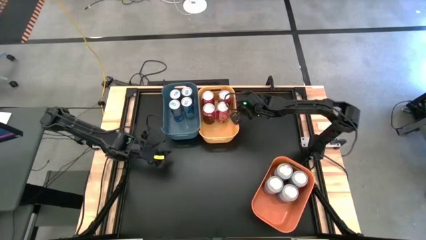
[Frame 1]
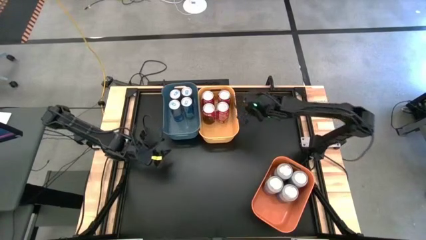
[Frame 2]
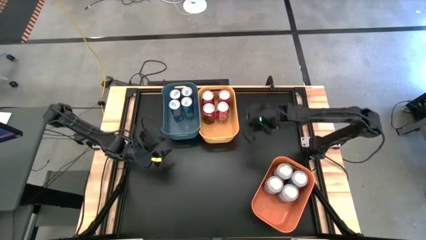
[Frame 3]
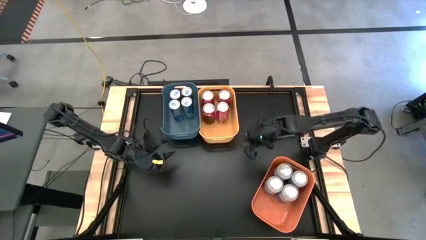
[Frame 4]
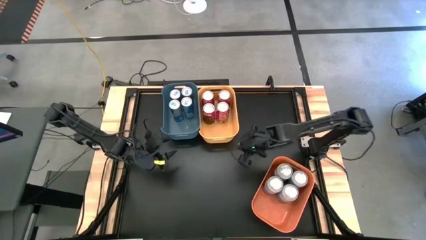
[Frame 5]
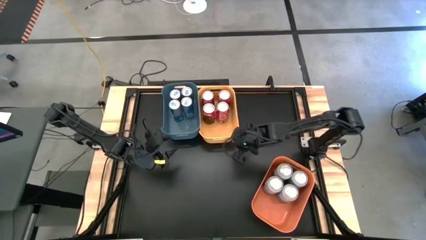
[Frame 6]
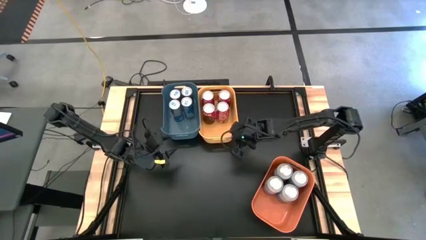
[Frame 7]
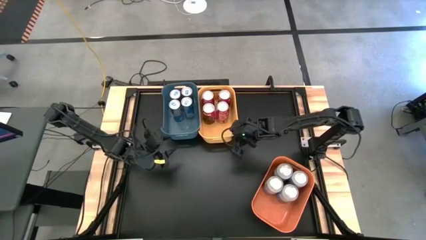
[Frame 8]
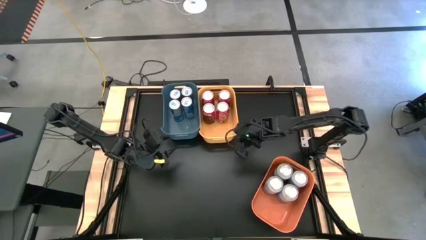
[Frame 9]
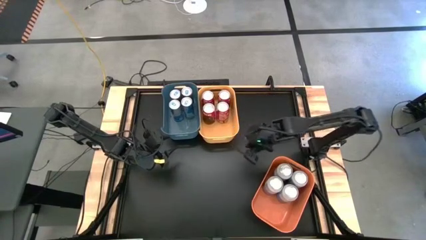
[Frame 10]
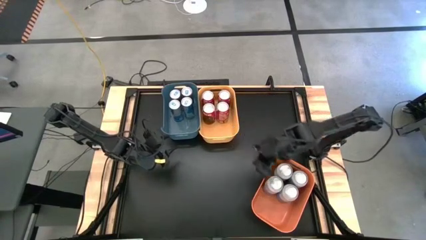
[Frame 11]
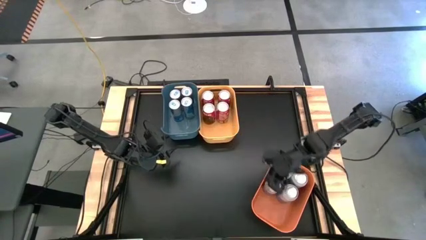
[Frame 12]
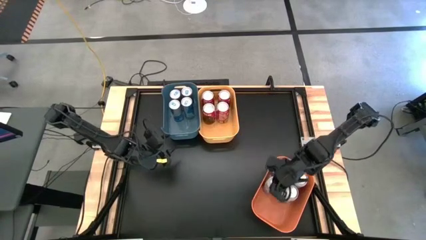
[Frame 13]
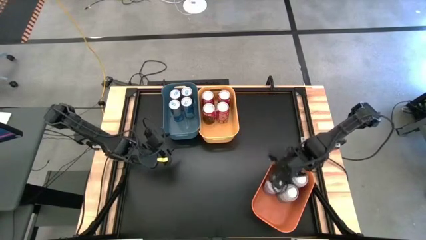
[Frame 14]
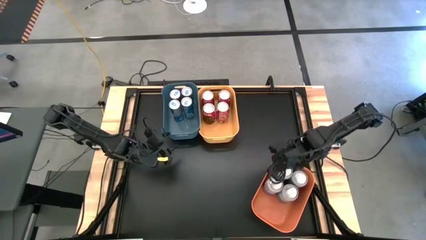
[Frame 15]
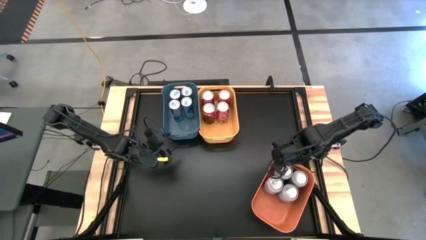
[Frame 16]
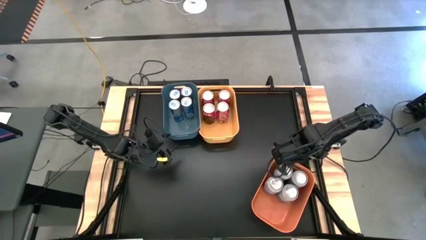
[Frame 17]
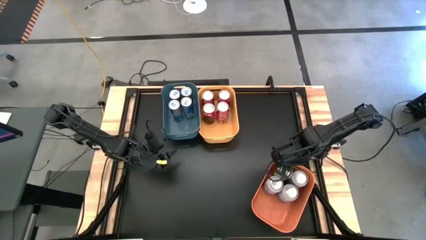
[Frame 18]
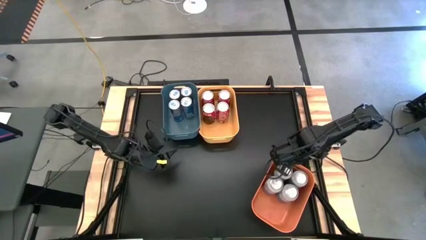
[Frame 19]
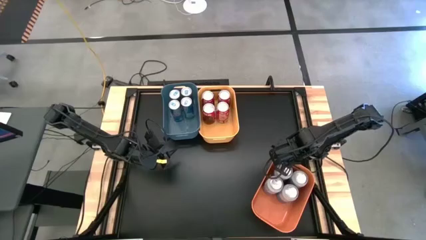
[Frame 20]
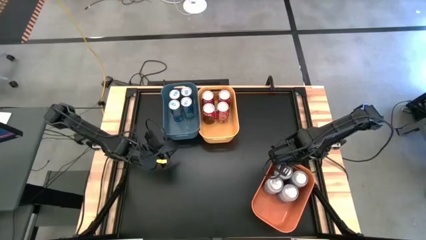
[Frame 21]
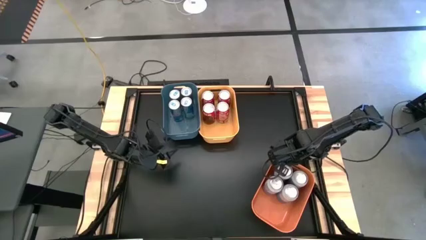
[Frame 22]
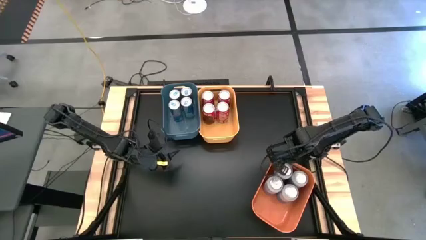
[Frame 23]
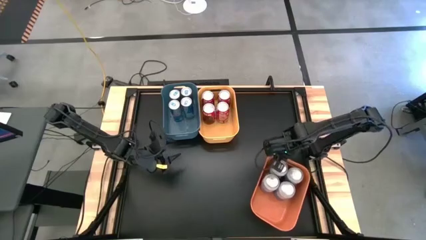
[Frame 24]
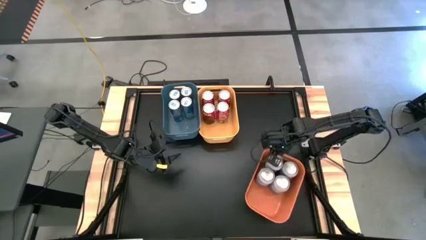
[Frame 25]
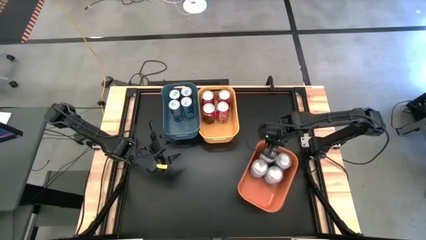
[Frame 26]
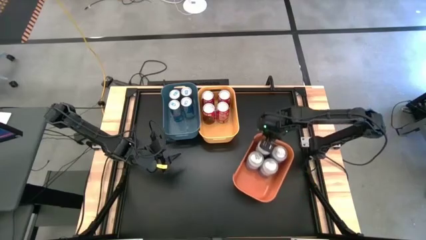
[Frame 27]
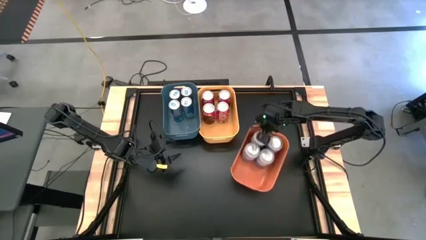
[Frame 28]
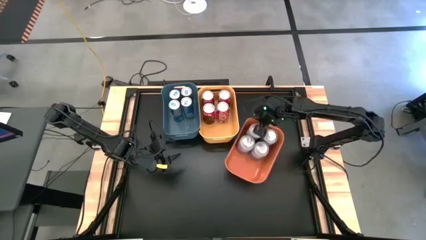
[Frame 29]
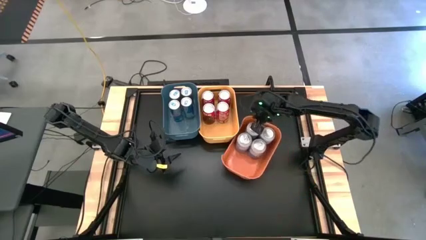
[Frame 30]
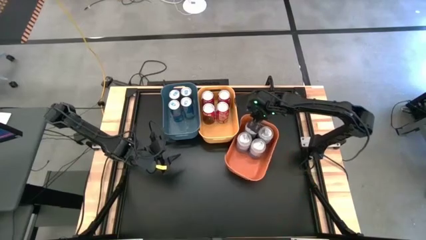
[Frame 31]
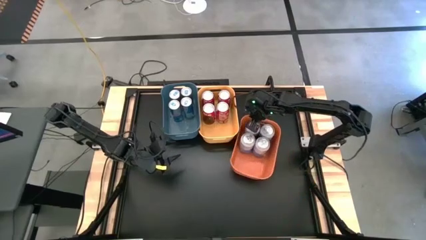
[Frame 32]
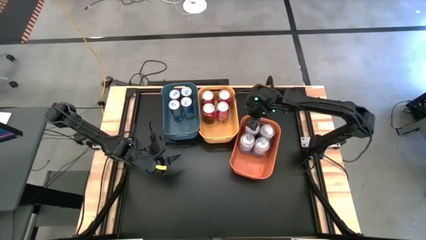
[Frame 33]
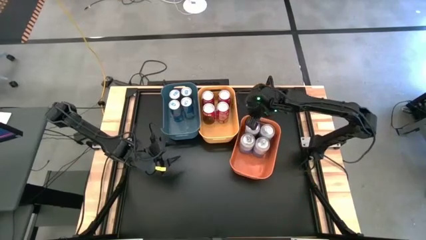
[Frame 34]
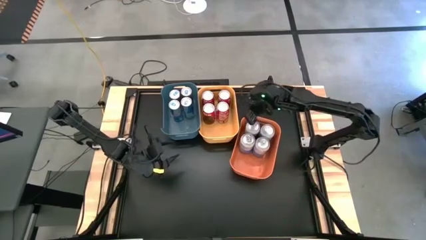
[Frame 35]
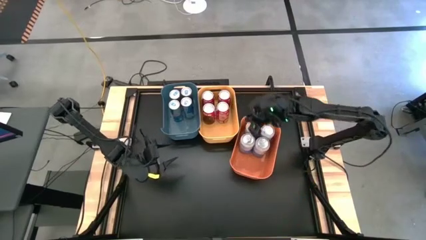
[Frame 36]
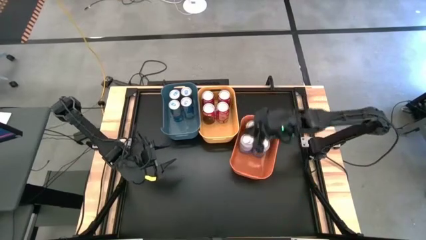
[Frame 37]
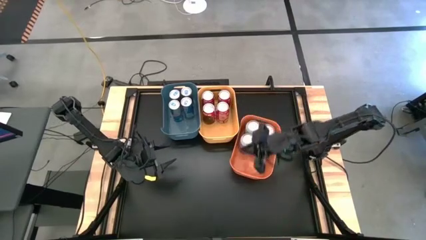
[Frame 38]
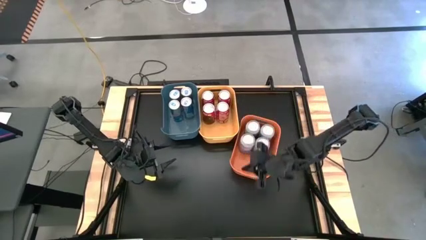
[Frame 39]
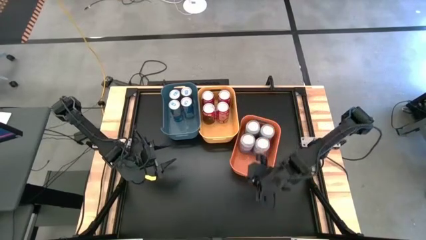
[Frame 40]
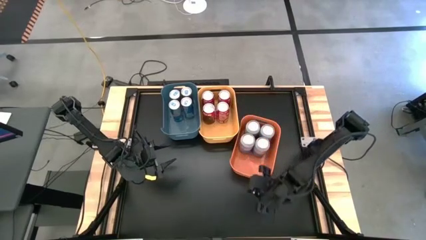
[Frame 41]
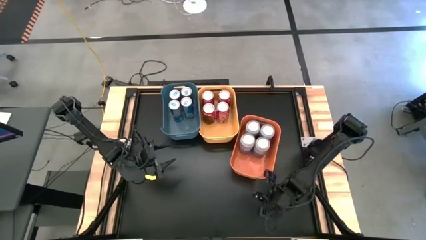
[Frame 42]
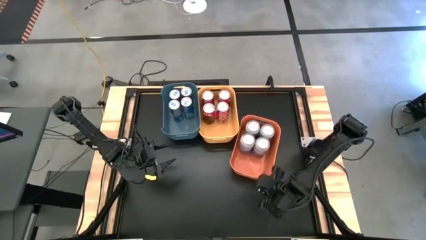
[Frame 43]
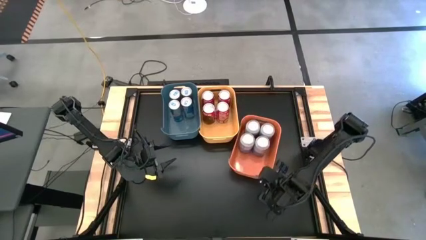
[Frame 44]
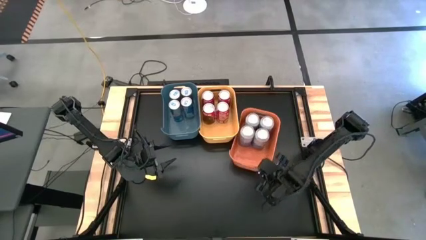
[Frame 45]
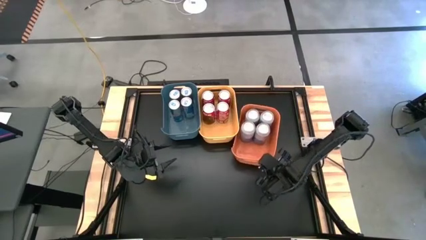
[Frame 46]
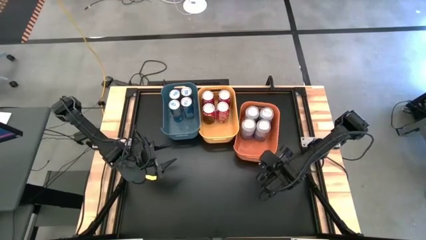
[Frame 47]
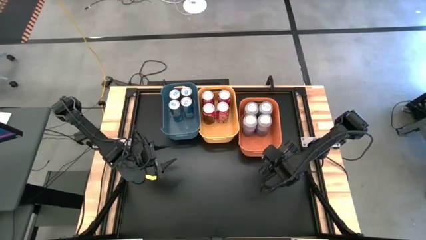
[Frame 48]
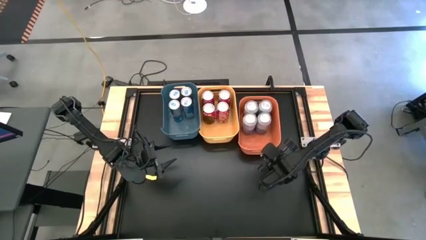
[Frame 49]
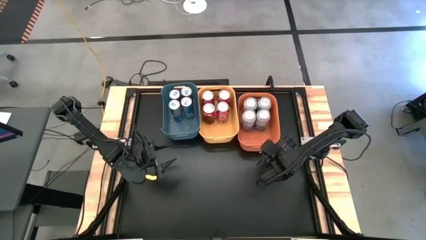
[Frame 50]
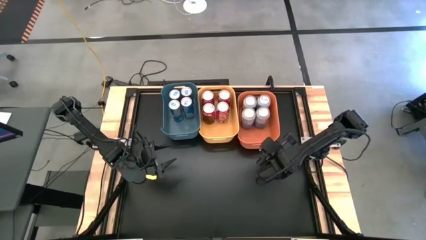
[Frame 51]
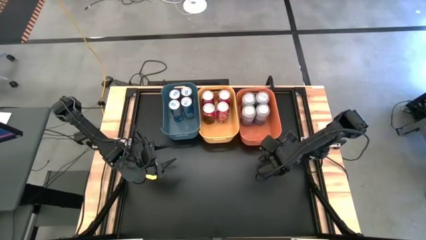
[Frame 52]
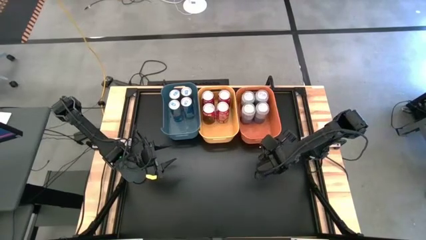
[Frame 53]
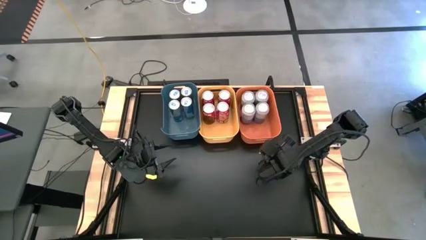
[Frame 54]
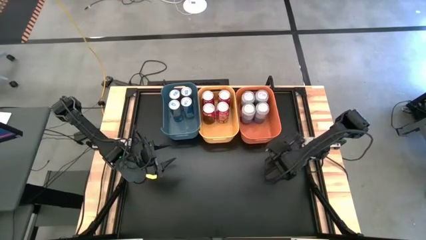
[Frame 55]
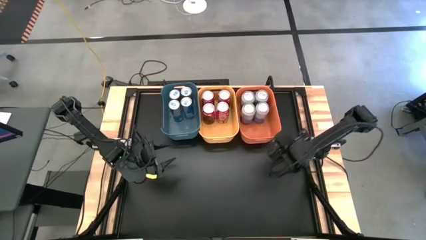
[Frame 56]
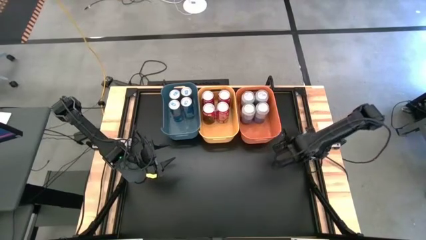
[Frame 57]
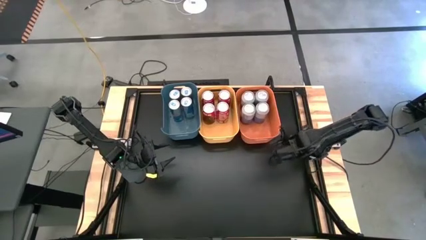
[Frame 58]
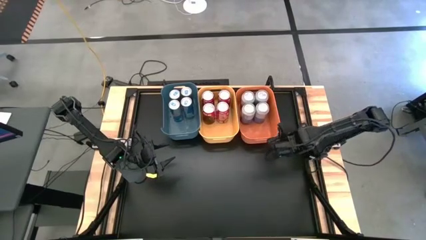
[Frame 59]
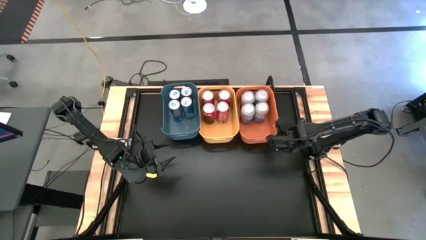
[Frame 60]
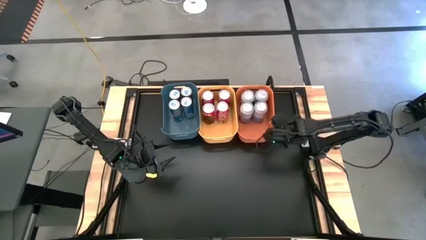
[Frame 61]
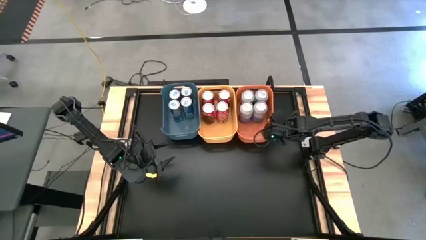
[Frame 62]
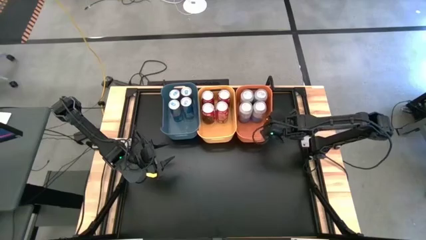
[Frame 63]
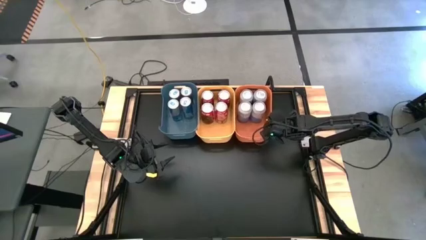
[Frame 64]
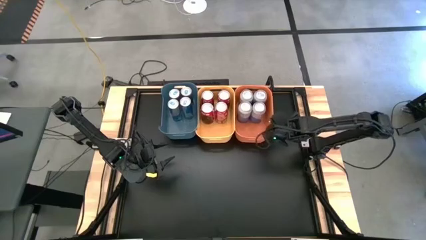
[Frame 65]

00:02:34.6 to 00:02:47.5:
Task: Sort soda cans
Move the orange bin from the bottom right of the table to beside the yellow bin

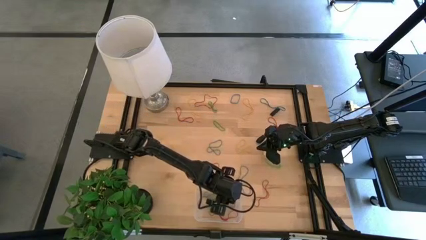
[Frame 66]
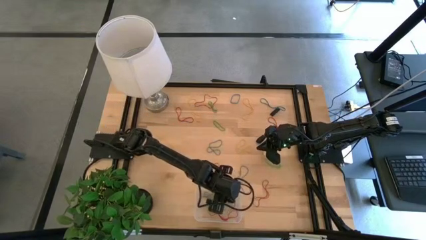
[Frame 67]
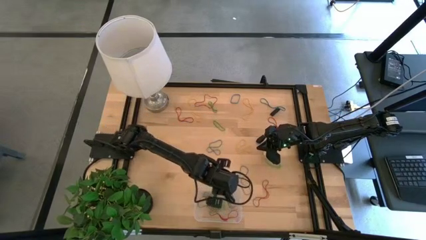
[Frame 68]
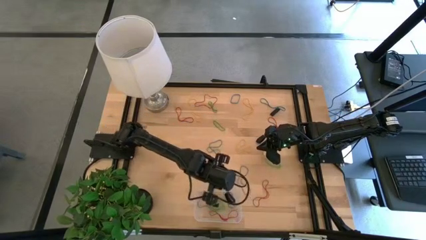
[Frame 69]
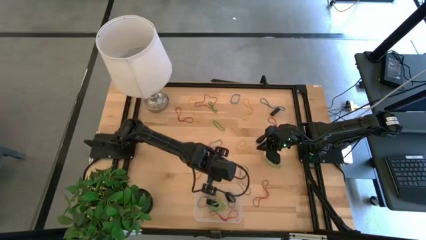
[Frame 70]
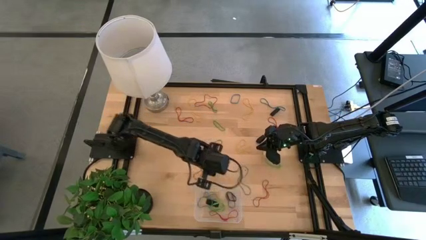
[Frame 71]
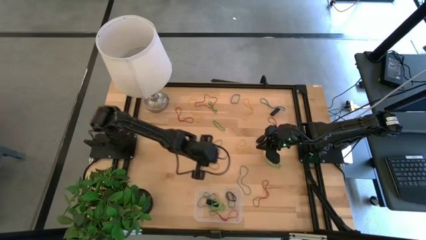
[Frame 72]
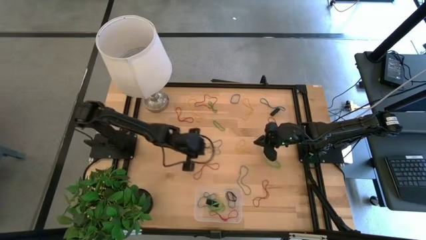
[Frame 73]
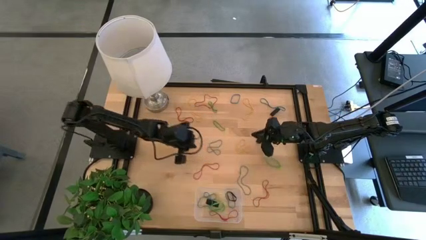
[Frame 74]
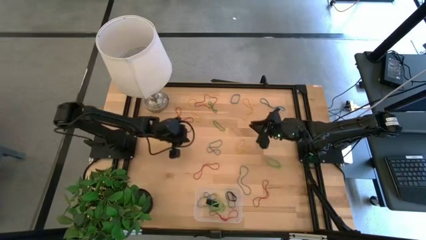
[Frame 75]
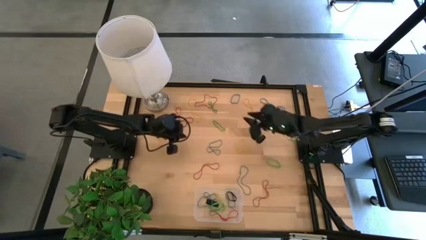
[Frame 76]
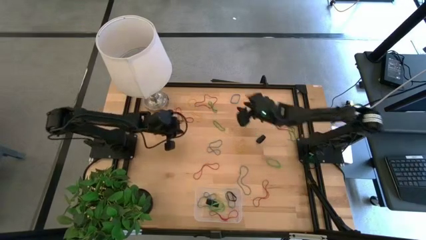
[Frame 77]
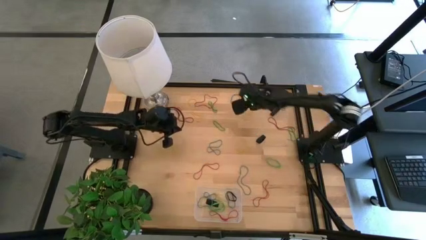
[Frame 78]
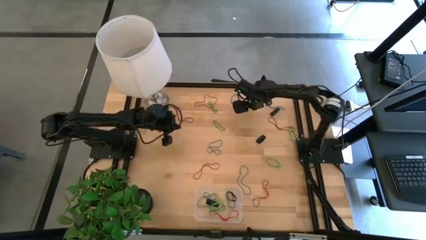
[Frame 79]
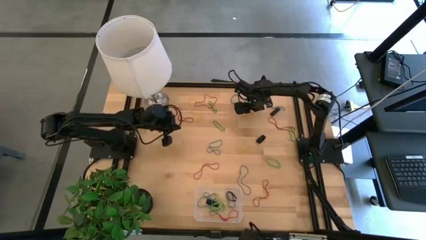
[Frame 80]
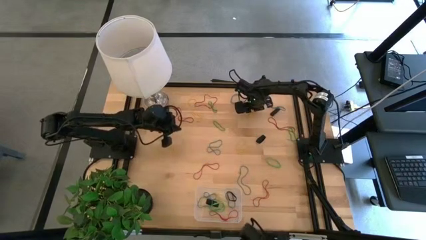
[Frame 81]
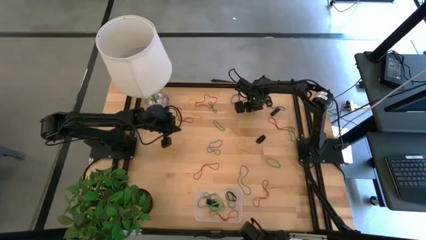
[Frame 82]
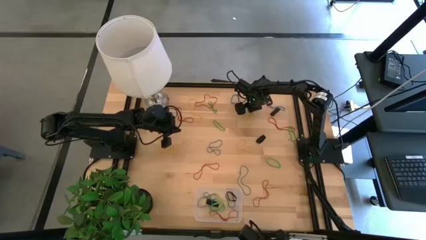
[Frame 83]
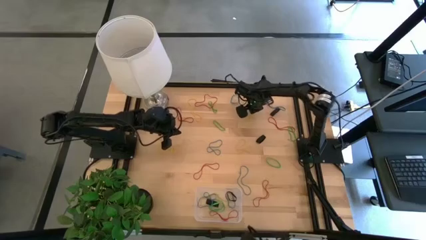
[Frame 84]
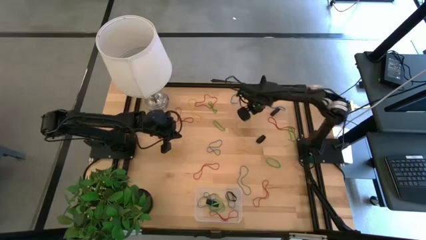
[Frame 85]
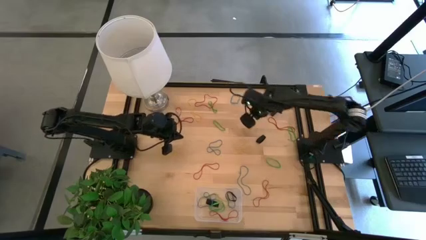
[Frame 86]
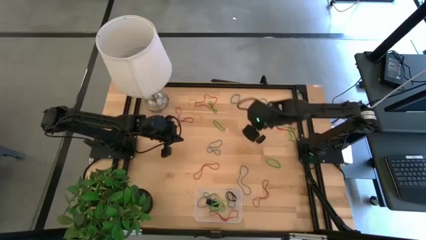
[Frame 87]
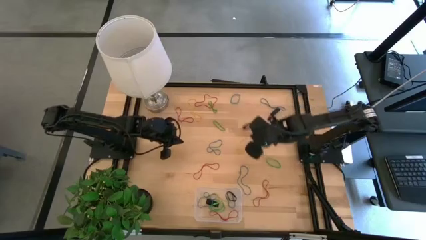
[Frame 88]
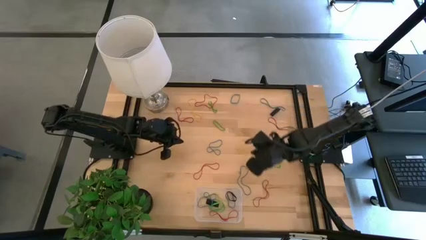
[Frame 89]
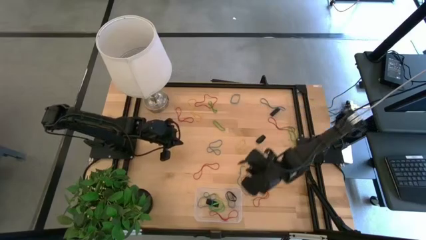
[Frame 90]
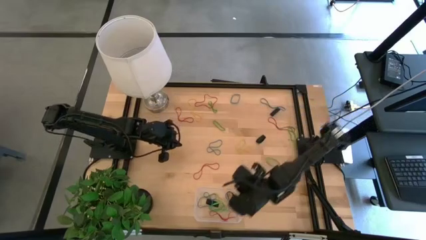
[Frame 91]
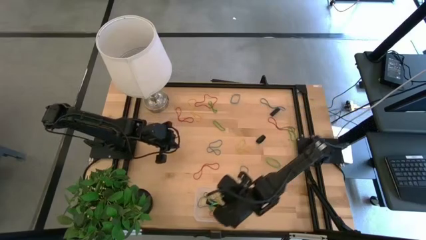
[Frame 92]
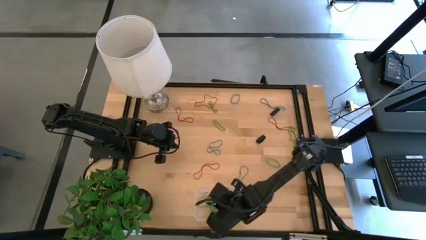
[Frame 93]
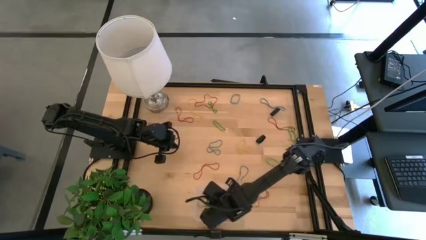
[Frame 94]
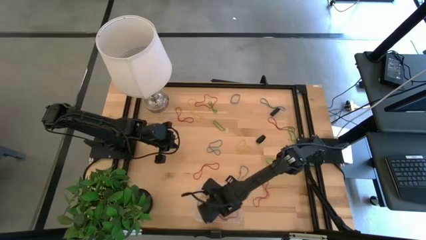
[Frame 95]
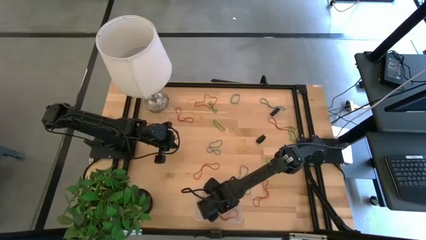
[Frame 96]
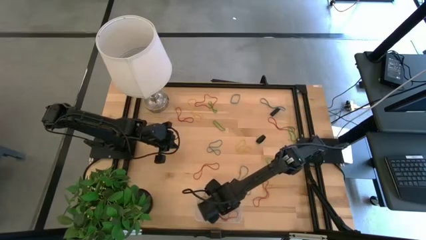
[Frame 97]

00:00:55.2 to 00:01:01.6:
Task: Pick and place rubber bands into bin
Put the yellow rubber band into the transparent bin
